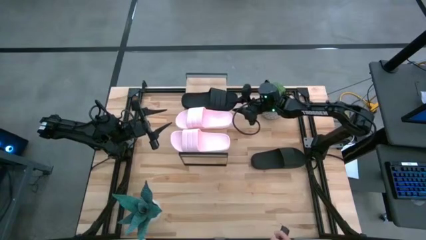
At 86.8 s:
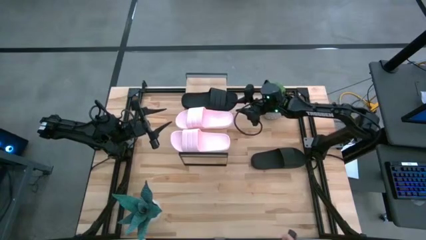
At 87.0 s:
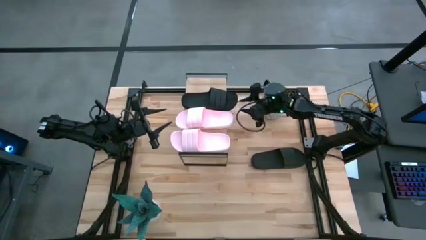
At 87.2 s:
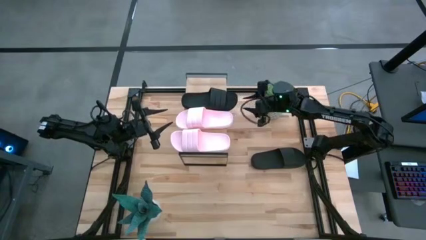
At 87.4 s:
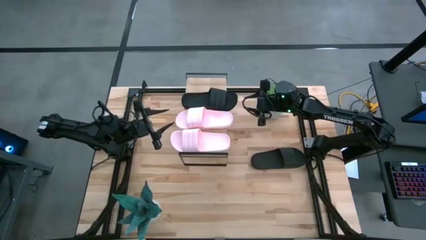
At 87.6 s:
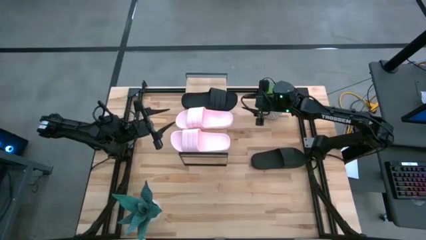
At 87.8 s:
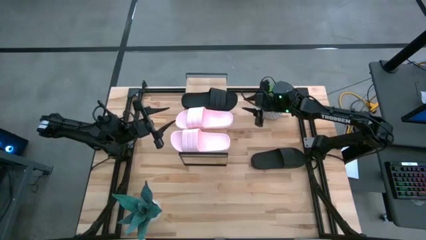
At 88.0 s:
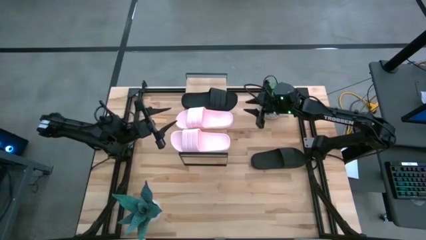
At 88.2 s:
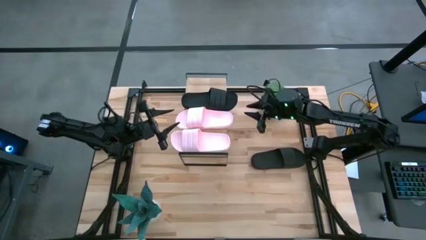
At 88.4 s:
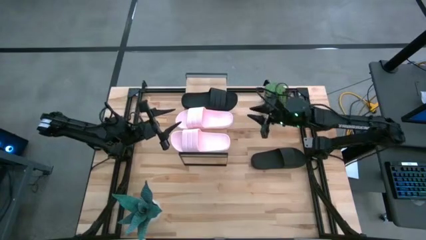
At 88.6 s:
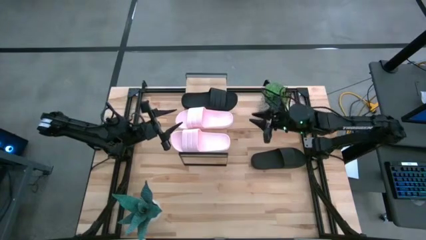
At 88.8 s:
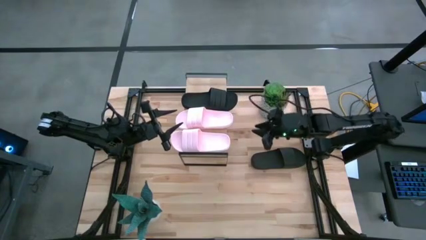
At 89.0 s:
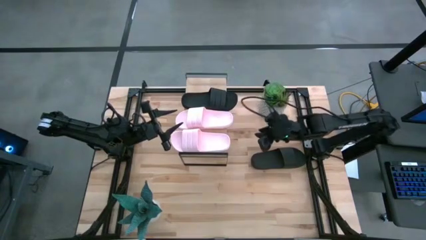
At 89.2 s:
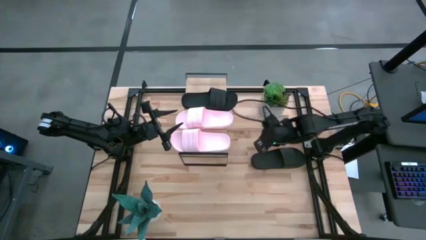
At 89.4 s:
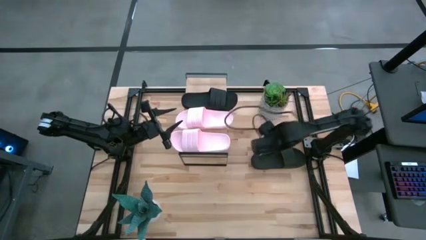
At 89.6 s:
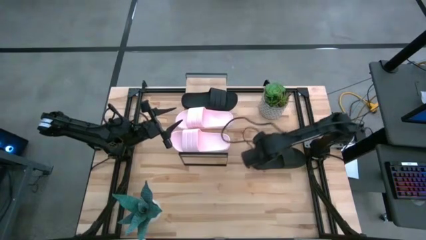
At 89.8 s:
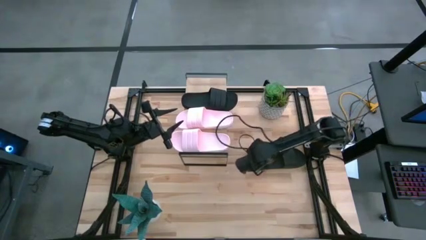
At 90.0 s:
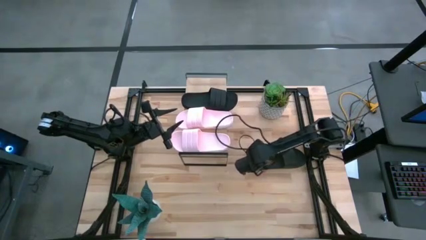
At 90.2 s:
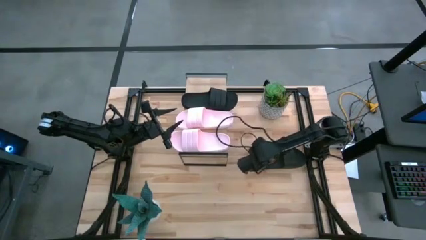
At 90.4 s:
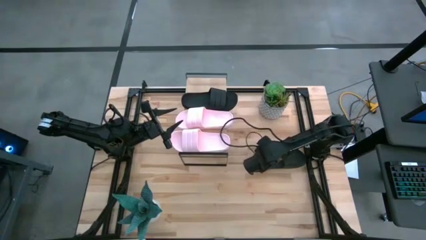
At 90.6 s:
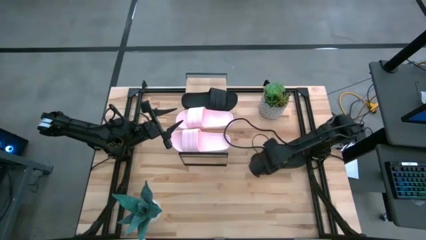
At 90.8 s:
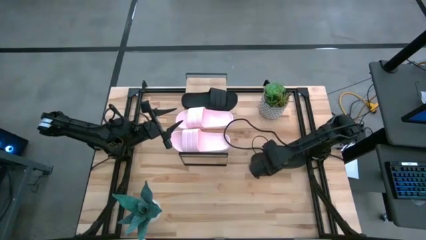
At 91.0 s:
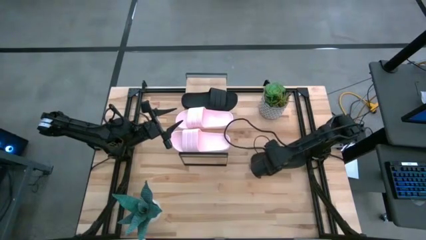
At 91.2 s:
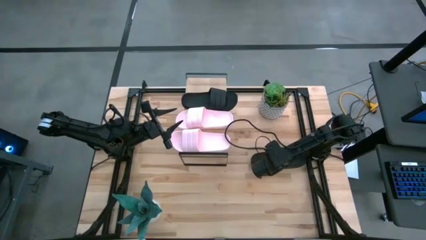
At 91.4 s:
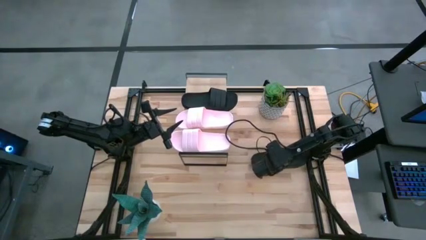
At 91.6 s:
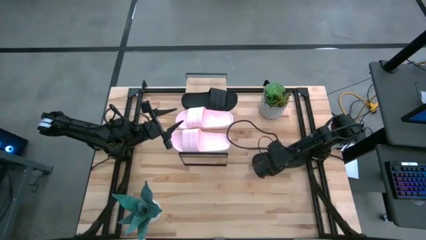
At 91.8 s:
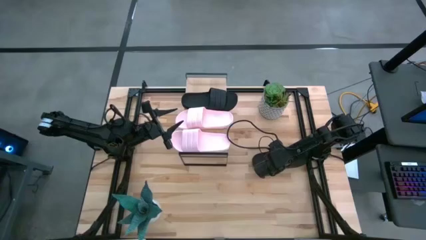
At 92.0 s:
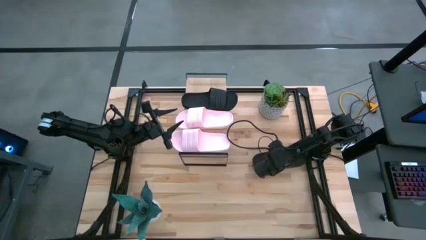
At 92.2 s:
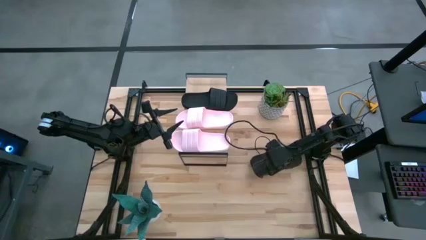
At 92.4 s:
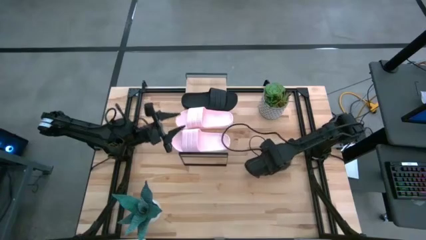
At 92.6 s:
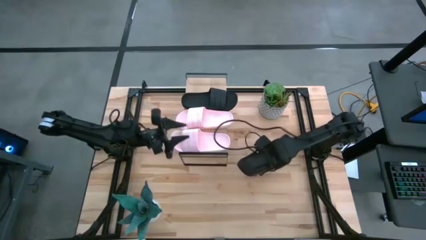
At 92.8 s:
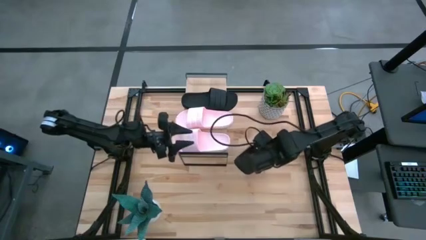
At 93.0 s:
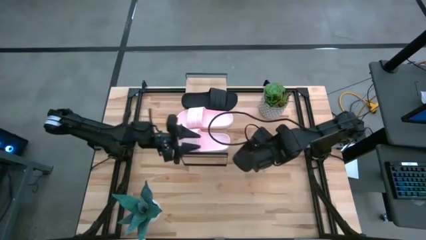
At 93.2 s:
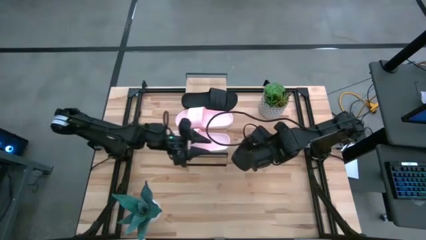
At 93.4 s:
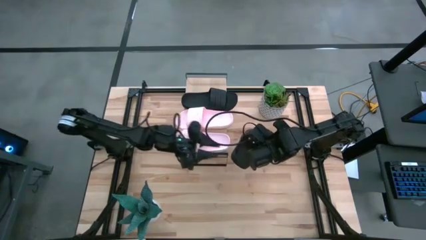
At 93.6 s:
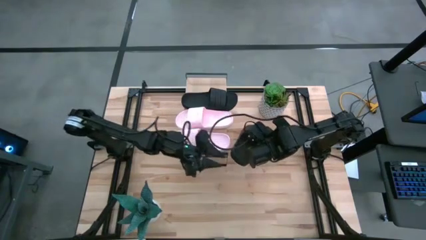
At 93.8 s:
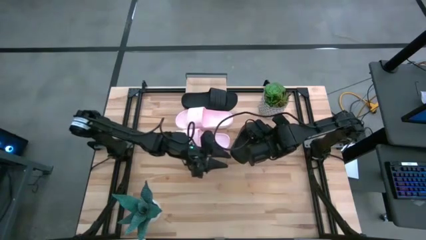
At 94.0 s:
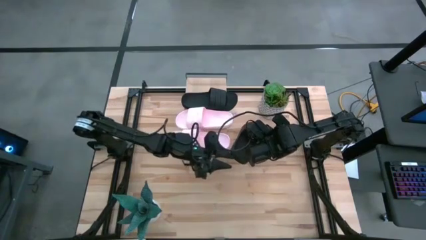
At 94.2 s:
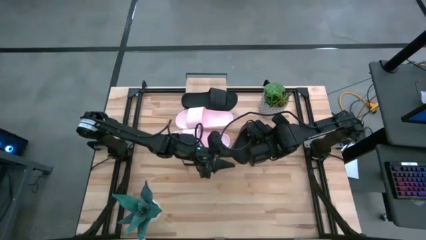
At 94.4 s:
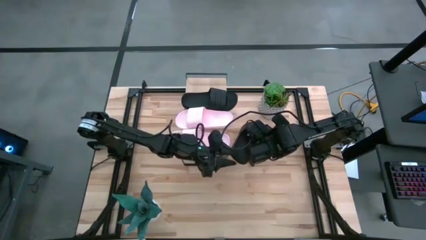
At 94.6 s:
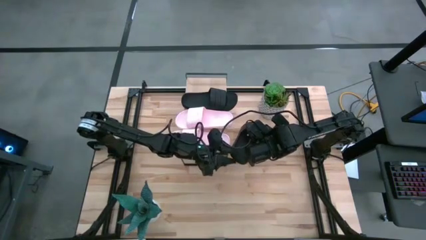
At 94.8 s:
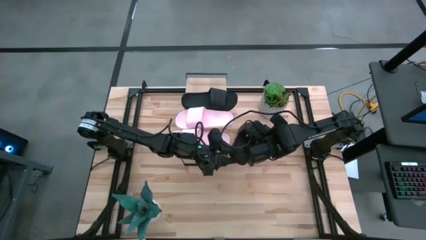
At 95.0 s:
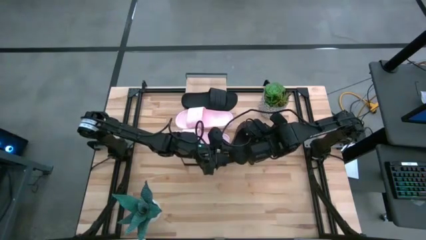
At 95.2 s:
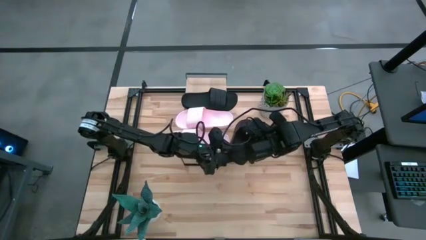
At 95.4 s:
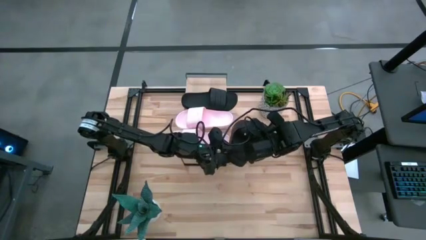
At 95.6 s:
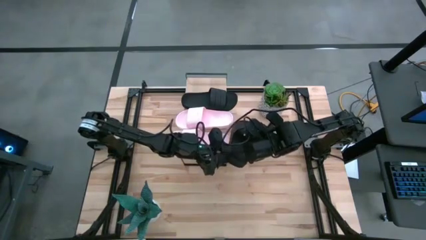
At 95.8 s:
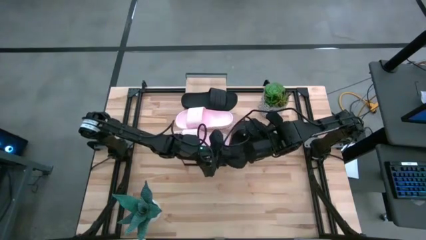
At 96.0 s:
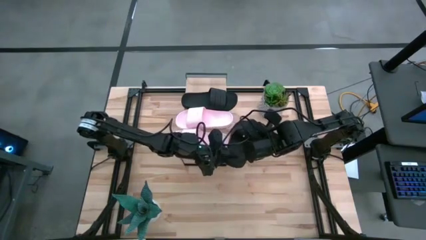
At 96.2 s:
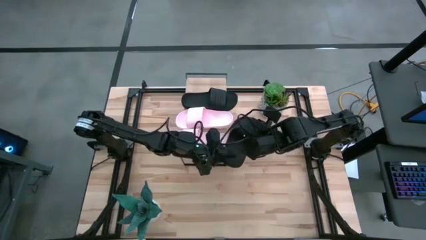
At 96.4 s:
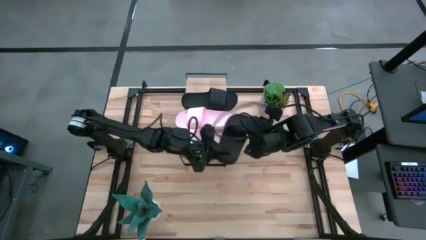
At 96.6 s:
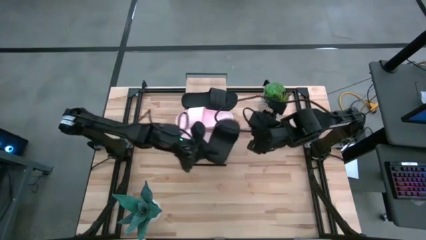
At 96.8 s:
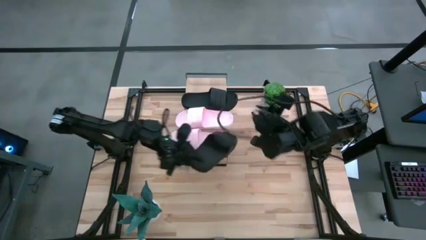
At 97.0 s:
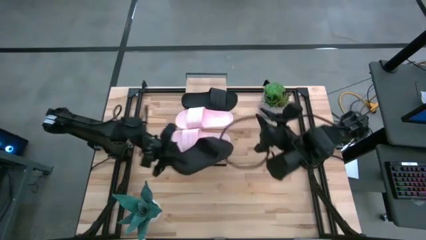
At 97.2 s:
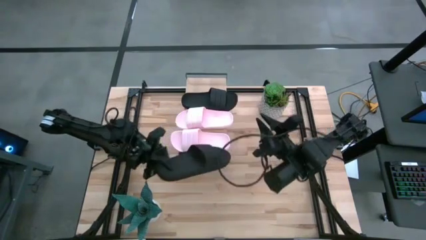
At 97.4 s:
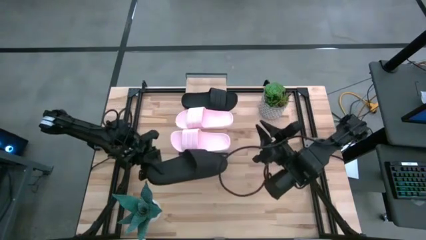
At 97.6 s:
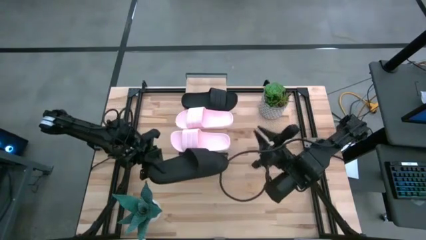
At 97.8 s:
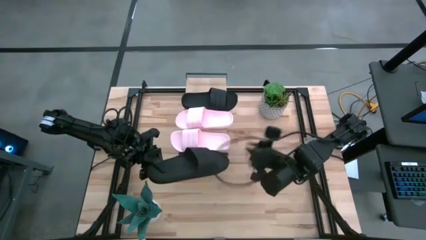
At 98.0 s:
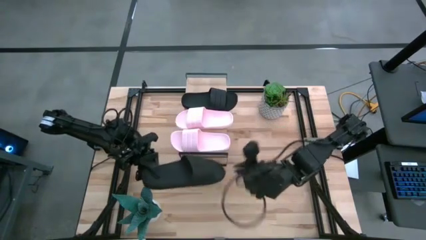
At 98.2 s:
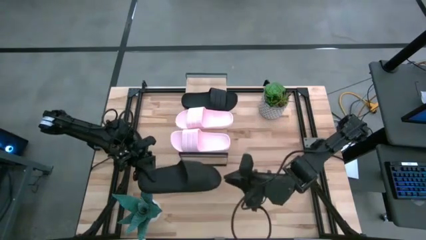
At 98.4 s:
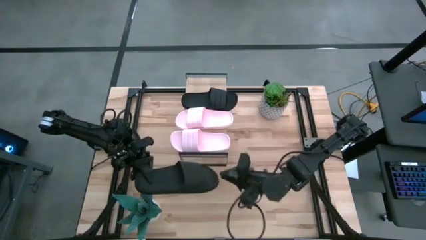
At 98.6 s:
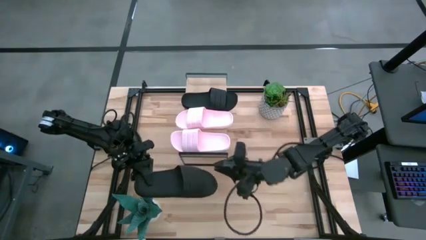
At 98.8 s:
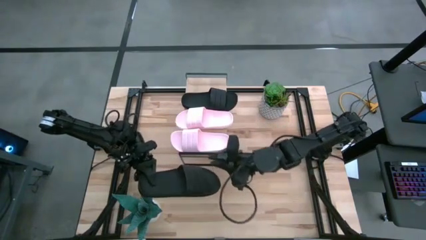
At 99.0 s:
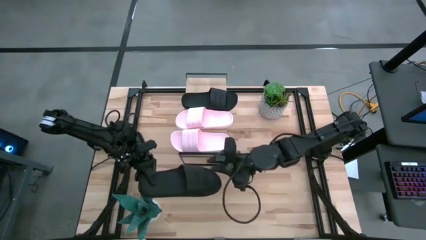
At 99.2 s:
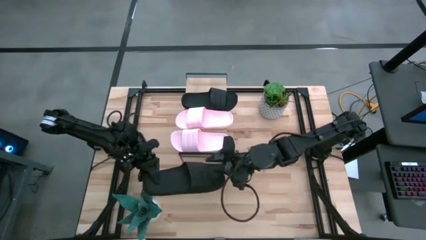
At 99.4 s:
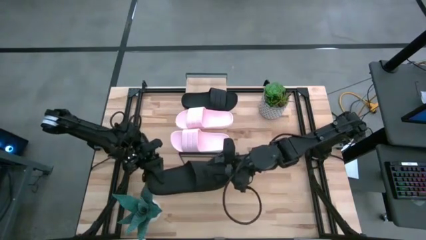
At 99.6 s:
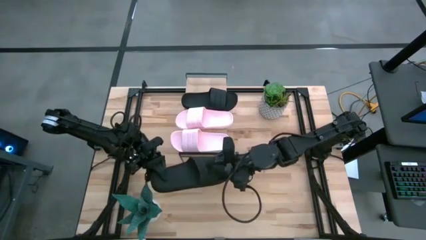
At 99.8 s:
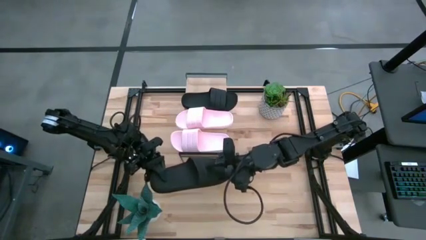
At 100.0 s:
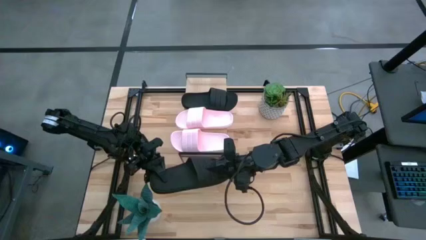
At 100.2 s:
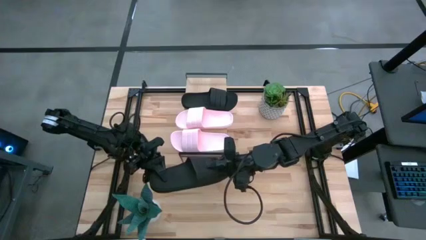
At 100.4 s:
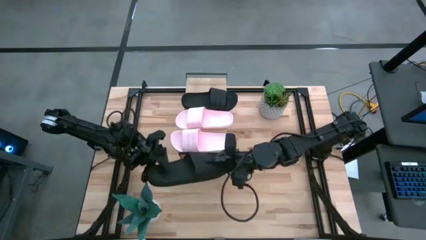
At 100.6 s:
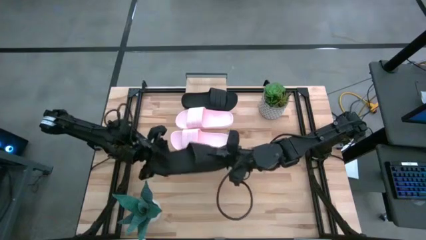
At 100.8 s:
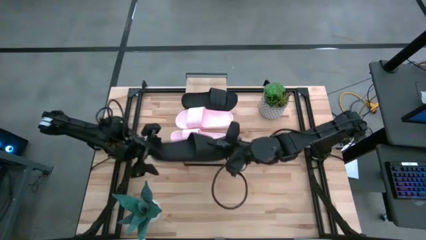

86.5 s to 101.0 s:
Task: Pick and place slides into the shelf
Put the black slipper on the shelf

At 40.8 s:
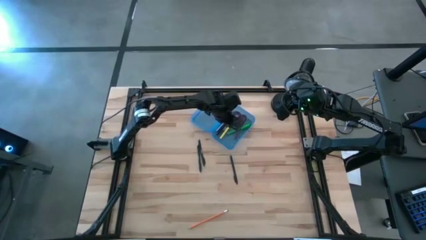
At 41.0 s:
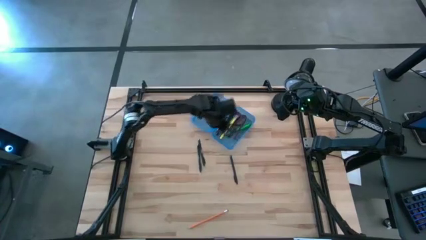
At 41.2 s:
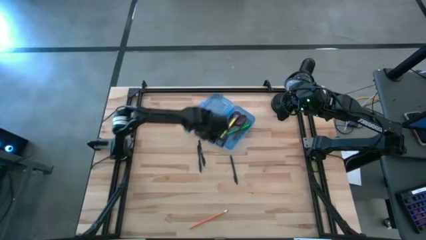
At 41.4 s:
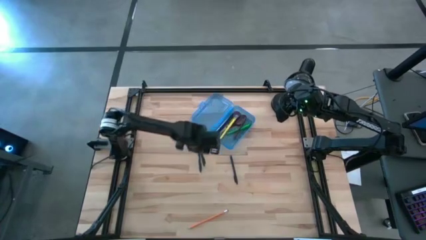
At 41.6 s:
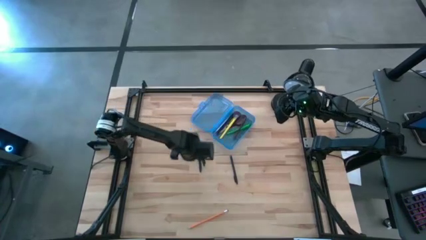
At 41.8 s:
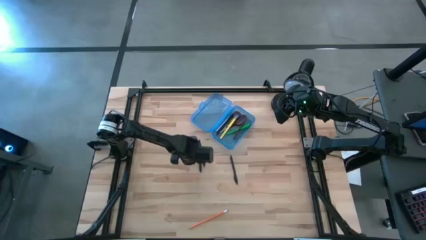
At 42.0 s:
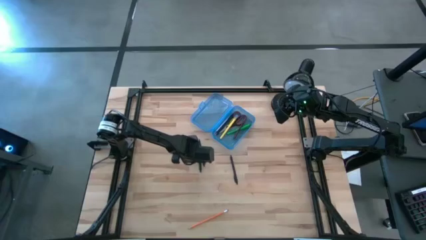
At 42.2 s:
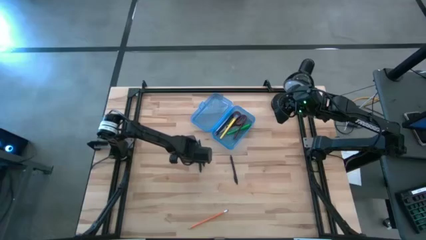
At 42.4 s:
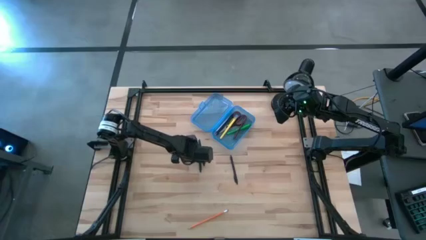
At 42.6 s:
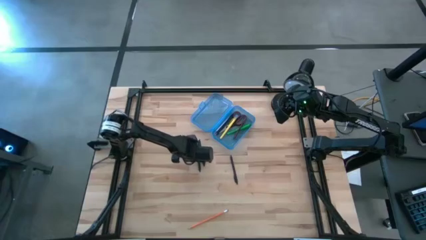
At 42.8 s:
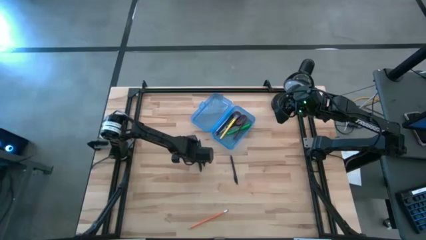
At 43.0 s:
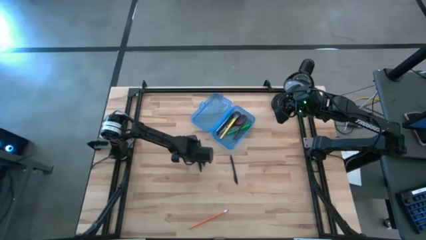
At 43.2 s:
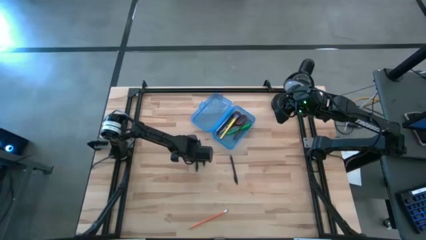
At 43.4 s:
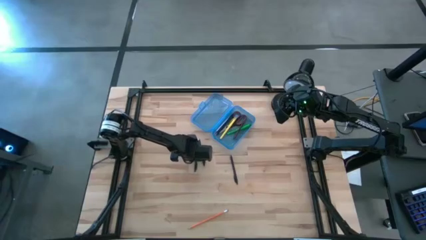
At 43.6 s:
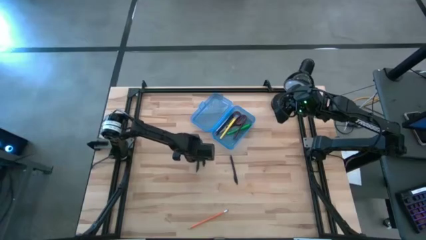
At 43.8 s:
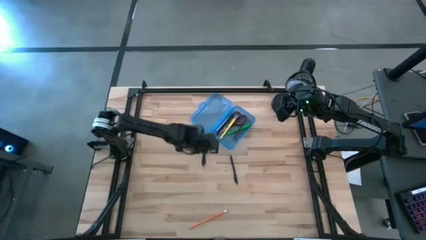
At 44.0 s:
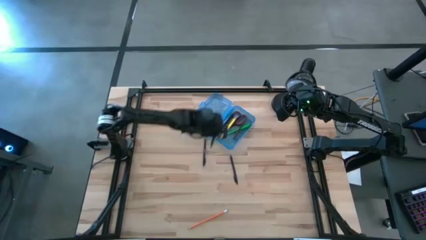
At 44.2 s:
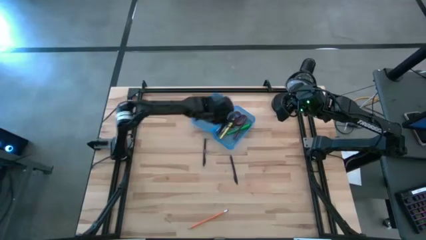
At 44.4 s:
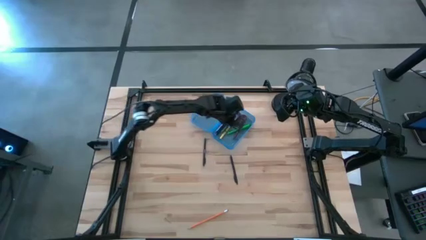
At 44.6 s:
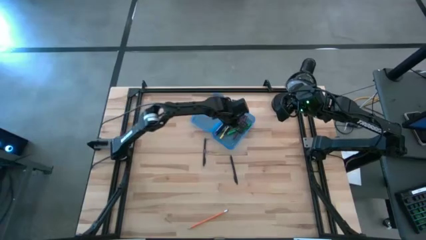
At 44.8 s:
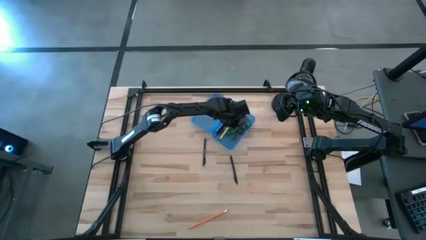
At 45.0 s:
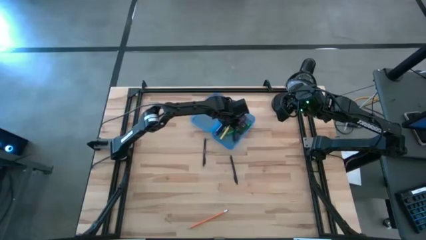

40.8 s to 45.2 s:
Task: Pick & place school supplies into a supply box
Put the black pen into the blue supply box
